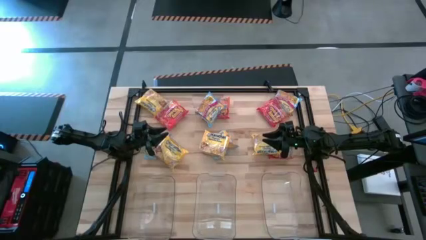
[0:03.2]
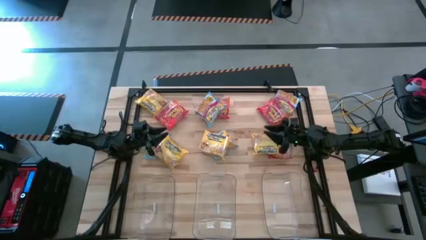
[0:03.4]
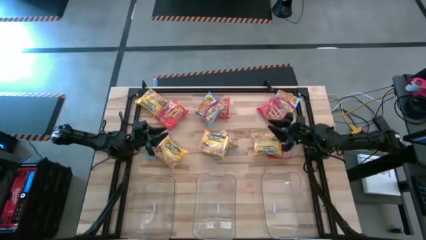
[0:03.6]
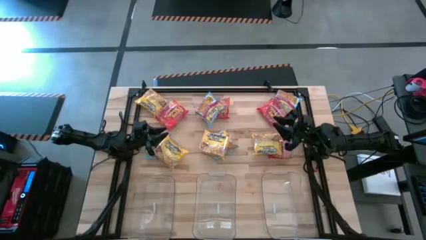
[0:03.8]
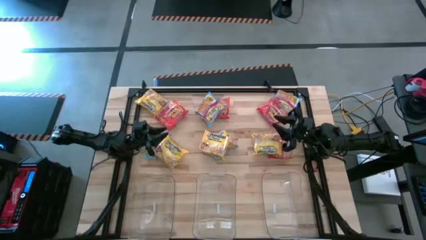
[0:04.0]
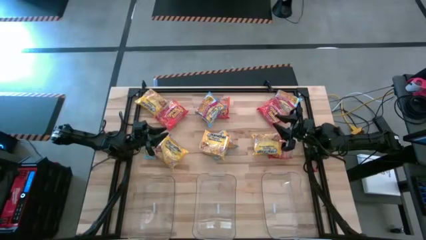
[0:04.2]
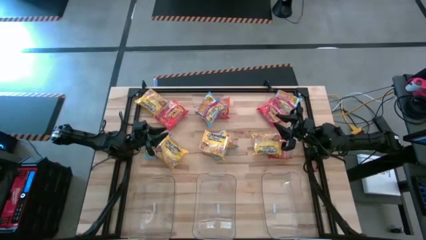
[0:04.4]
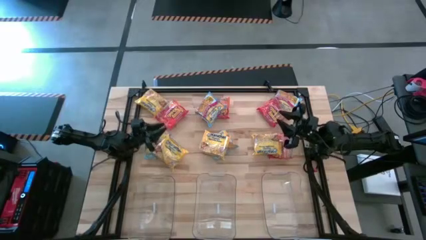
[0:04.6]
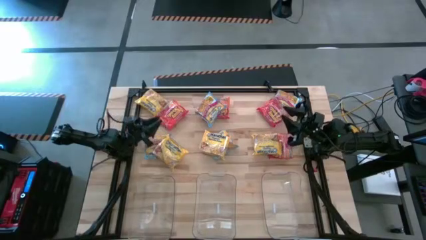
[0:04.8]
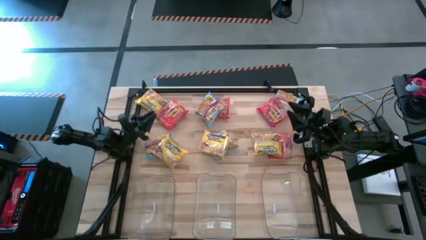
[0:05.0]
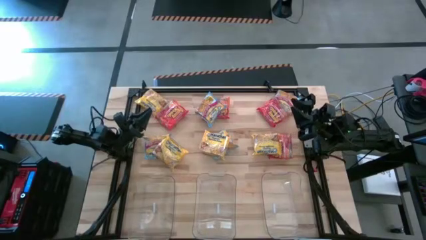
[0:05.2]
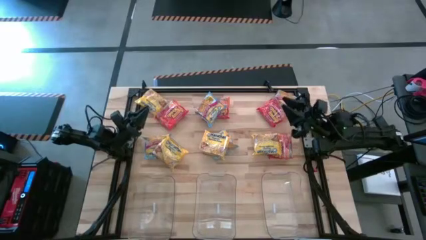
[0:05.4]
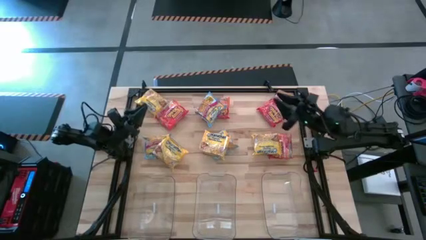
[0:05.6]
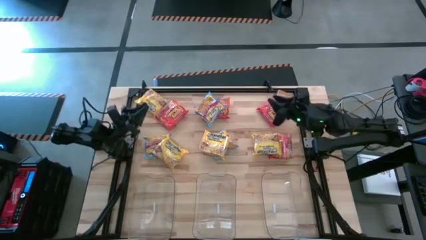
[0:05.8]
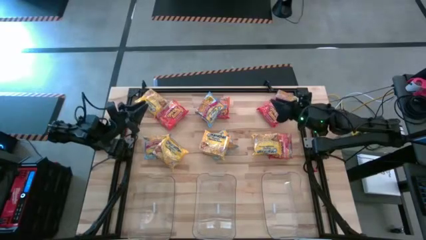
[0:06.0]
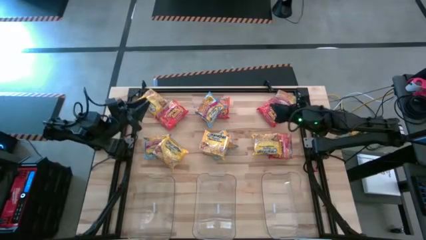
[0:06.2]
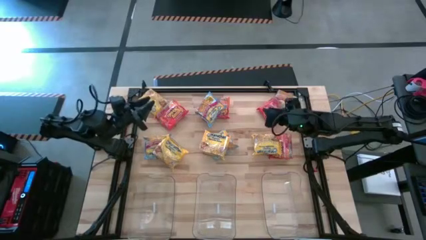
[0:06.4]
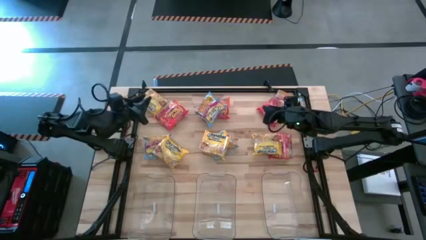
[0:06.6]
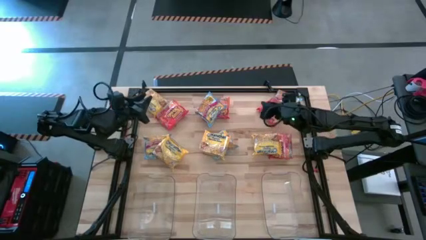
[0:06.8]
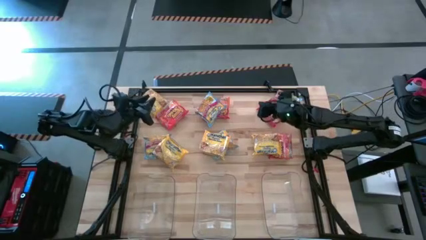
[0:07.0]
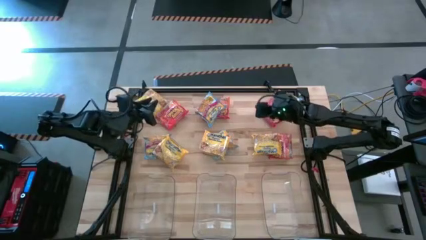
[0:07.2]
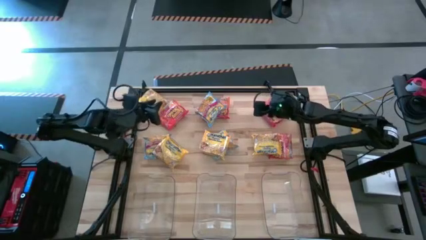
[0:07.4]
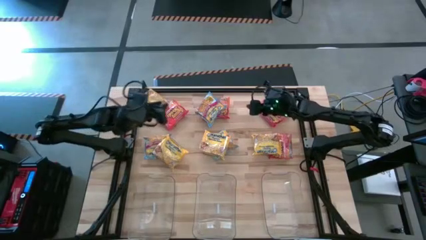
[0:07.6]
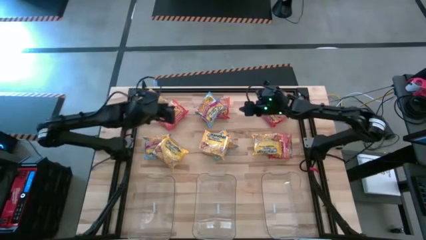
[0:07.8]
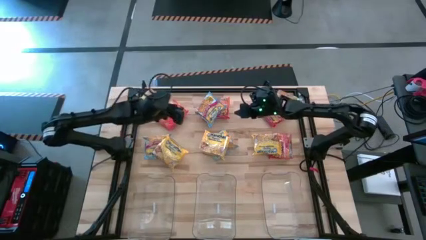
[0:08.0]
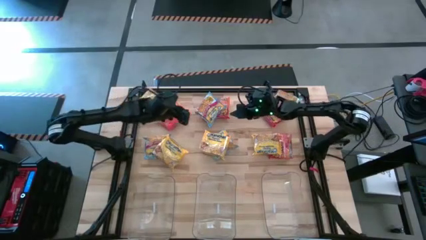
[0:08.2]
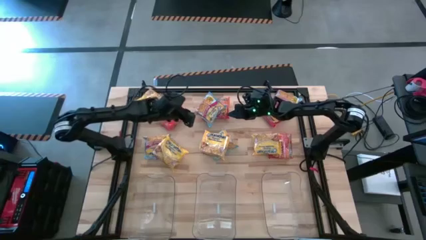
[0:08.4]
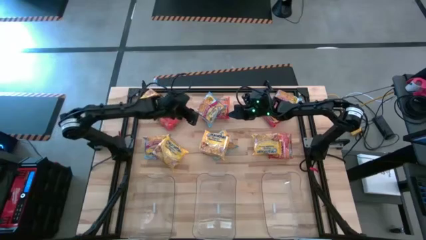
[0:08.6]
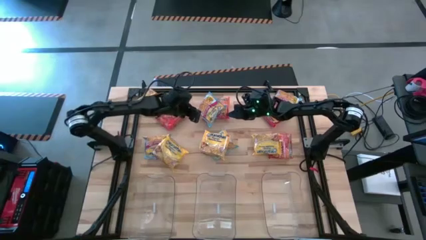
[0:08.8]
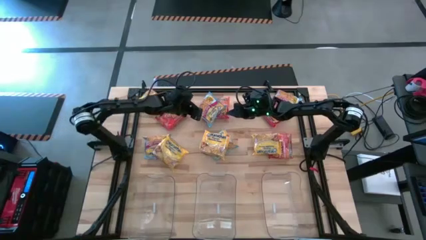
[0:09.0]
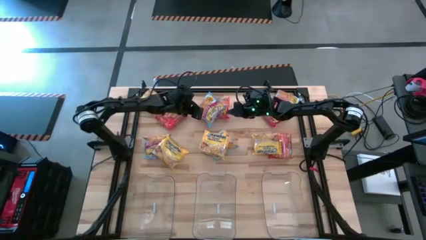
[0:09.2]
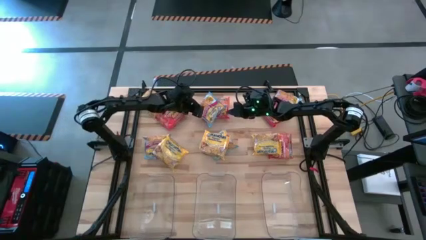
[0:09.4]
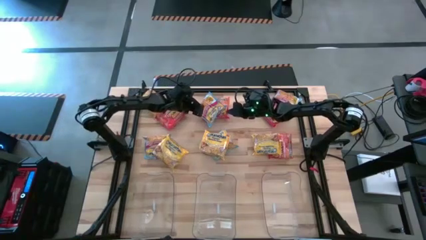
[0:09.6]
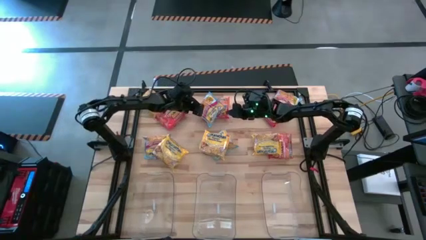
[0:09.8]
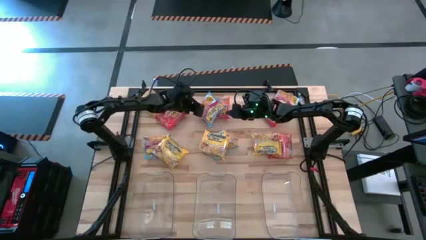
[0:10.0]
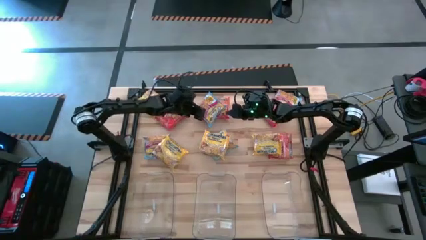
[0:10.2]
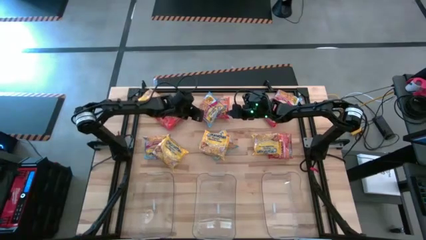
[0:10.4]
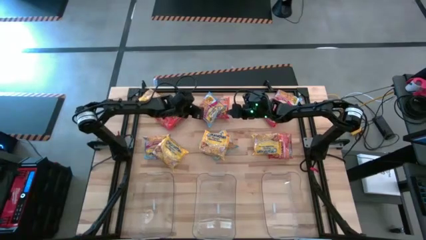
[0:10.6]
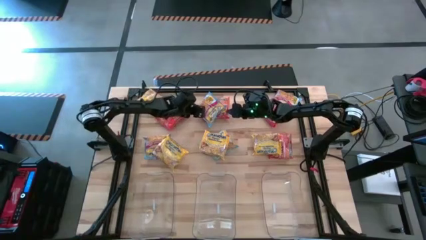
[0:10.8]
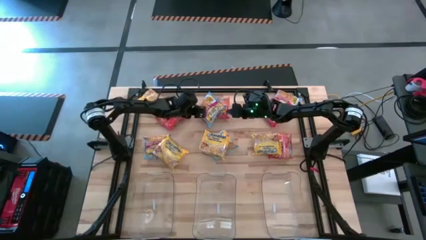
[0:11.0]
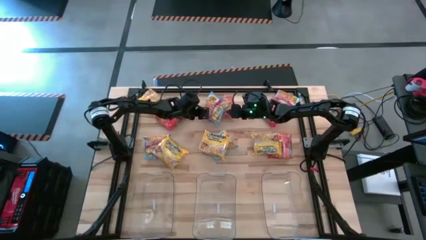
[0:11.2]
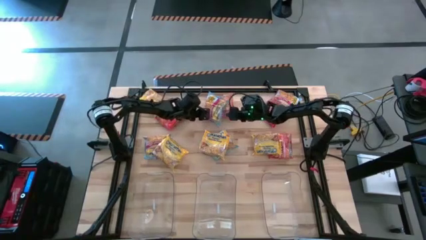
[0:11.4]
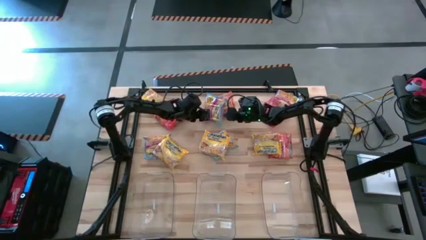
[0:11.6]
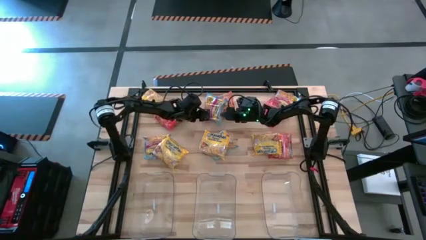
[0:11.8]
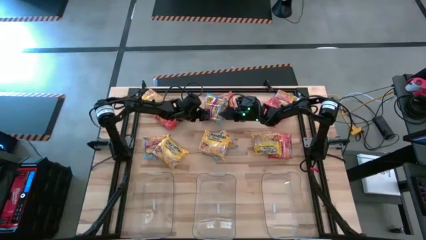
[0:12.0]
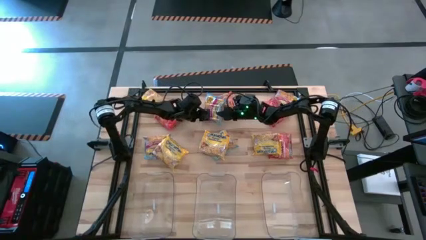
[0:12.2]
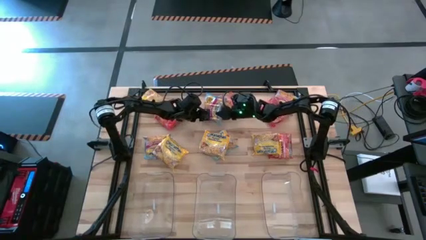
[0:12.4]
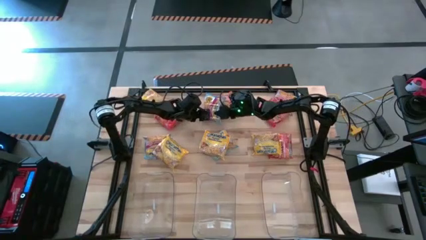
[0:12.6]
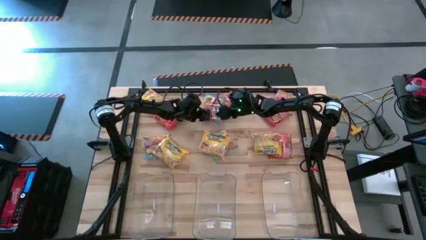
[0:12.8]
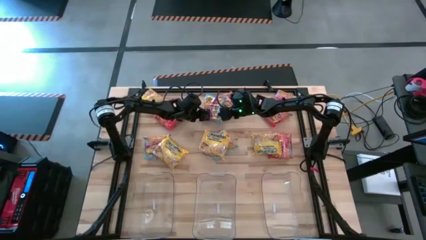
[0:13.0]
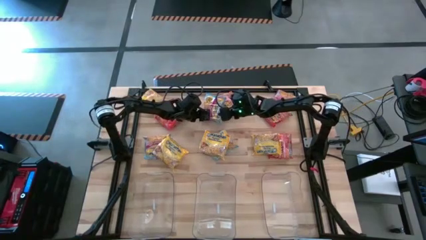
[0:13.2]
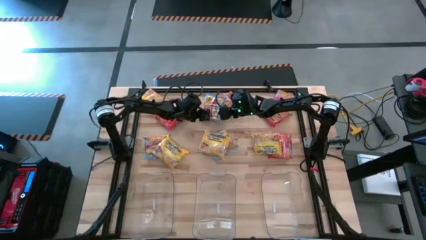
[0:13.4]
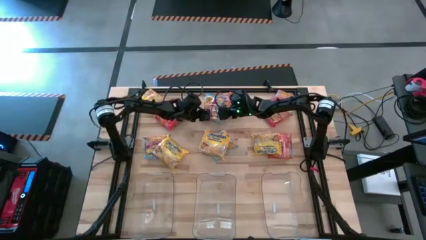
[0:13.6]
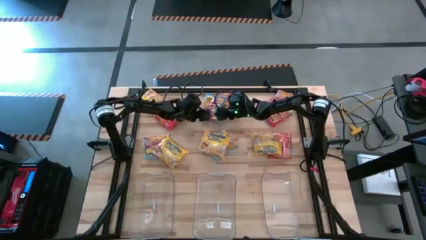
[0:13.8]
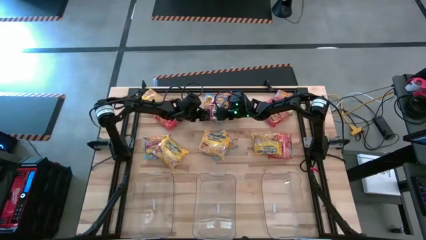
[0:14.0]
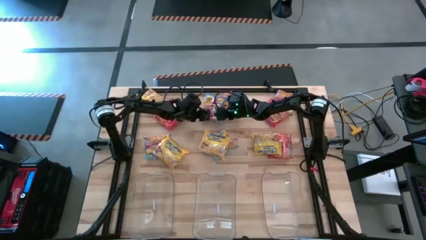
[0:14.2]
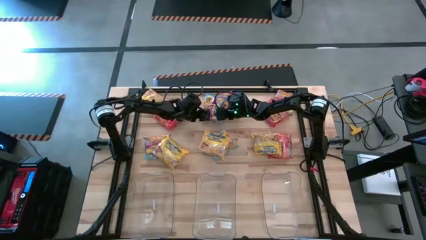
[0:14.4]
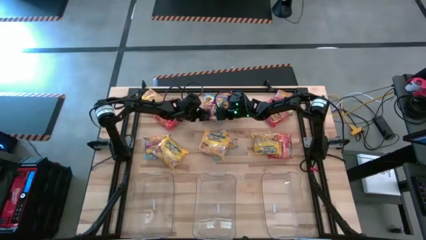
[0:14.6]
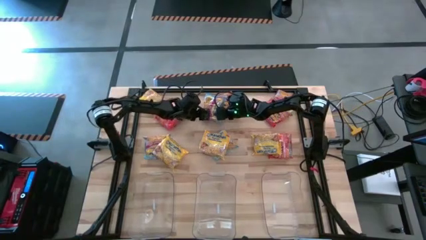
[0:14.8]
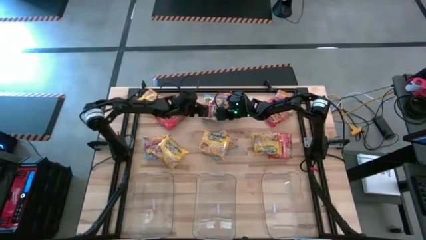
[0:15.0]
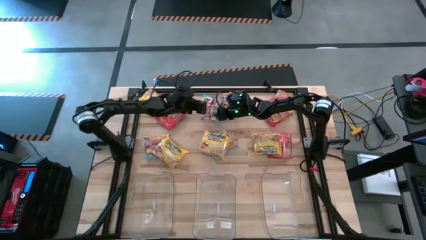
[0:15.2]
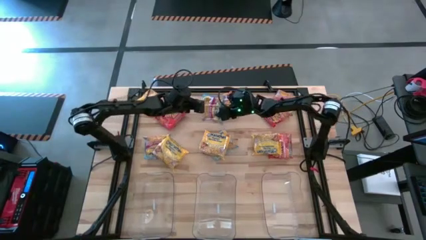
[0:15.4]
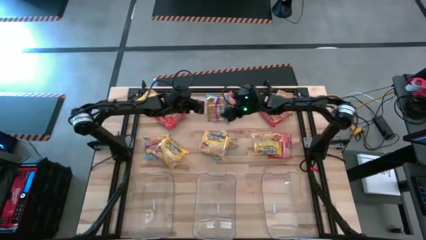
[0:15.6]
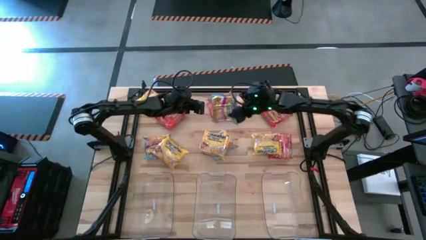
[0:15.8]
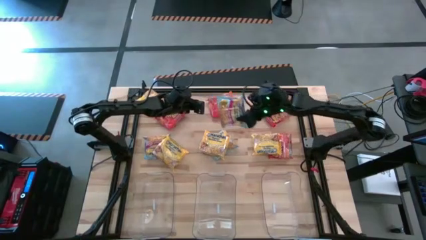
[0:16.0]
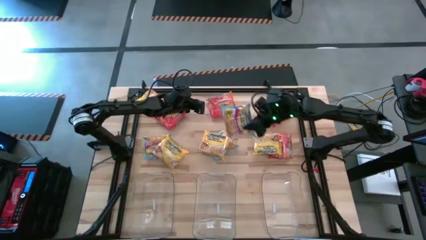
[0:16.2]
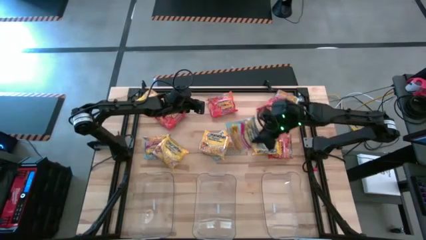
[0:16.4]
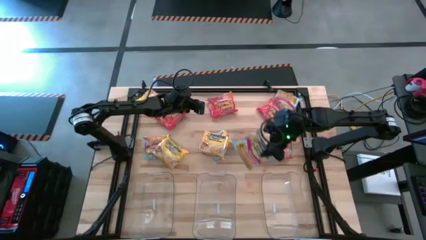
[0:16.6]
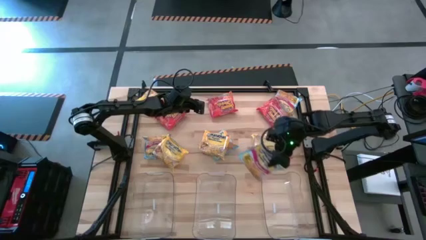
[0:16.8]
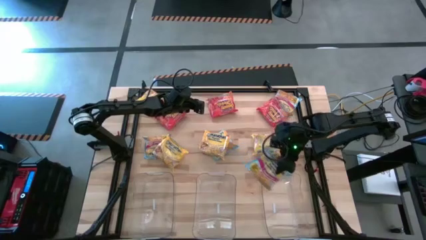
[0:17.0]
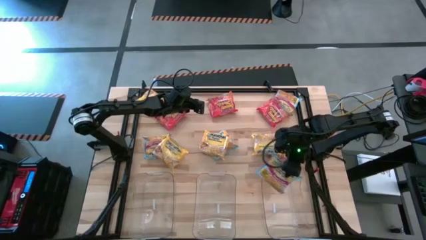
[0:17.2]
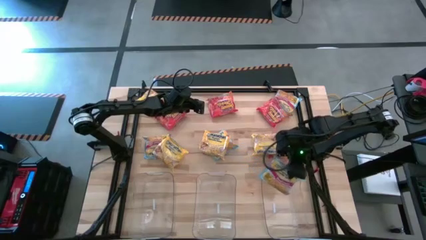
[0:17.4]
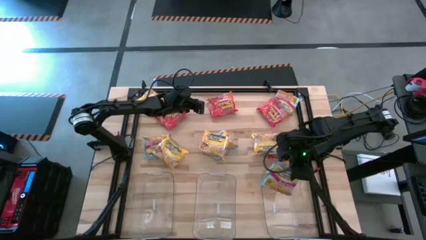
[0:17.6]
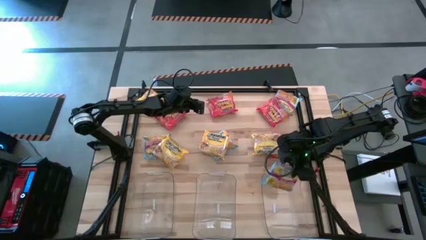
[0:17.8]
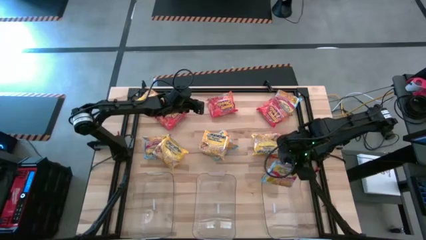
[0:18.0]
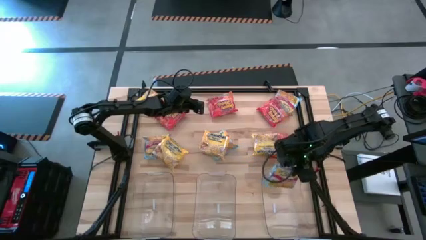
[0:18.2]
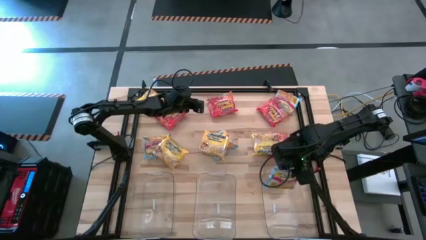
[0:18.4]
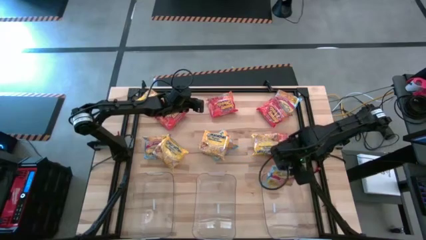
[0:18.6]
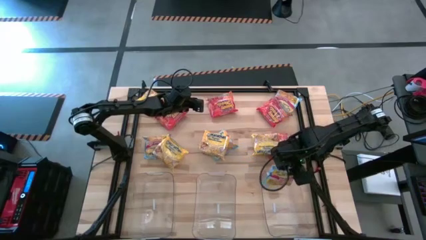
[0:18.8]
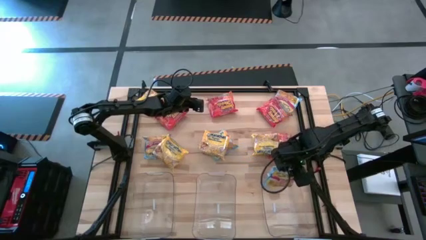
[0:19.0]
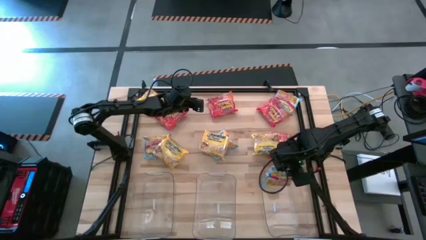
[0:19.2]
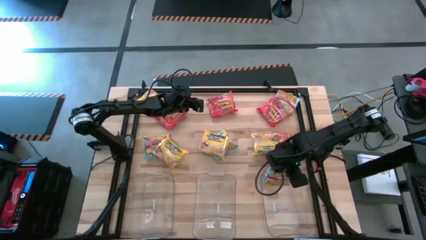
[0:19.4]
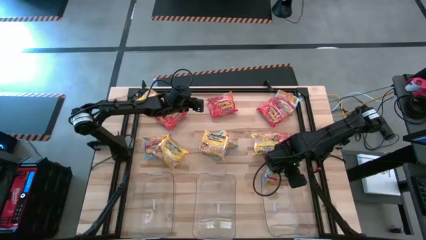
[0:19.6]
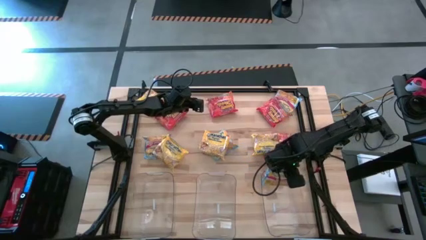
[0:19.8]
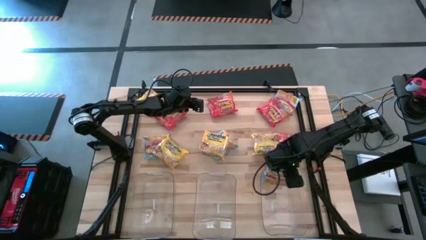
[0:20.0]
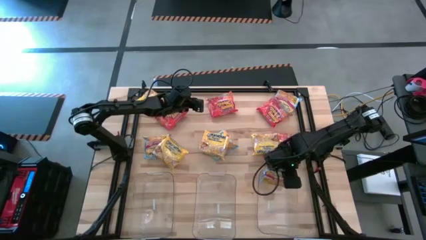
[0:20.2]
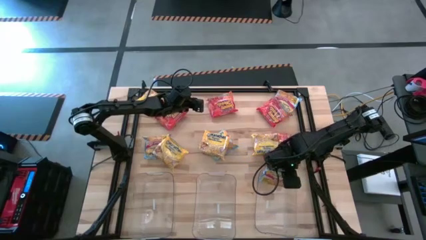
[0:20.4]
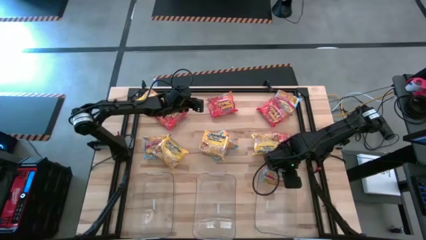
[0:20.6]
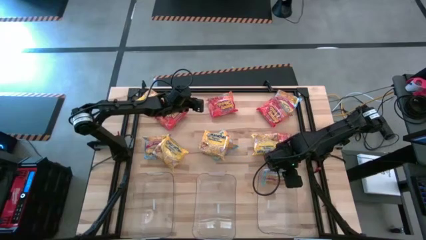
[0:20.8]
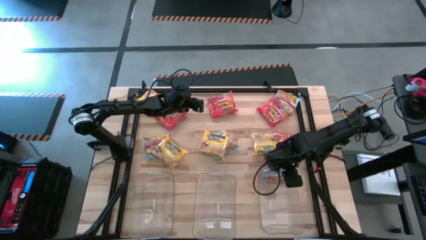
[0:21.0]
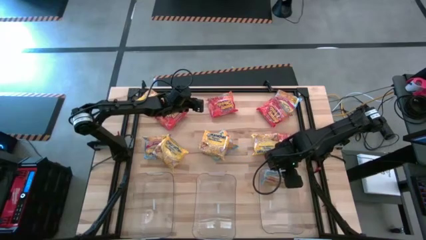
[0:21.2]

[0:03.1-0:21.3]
Task: Sort Maruchan noodles
Put the blue noodle pack into the right transparent bin
